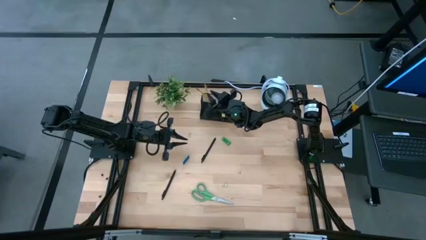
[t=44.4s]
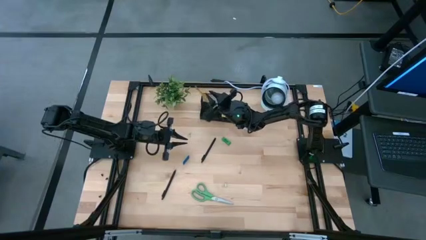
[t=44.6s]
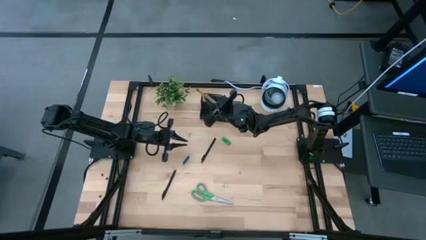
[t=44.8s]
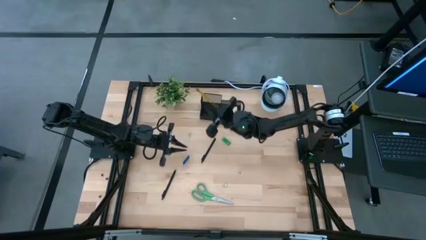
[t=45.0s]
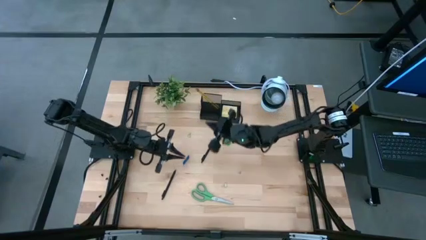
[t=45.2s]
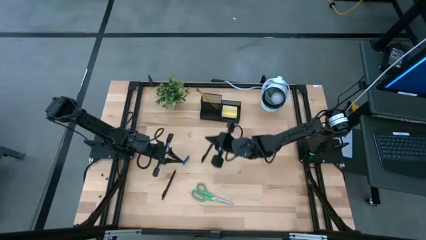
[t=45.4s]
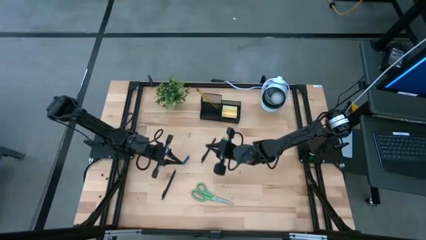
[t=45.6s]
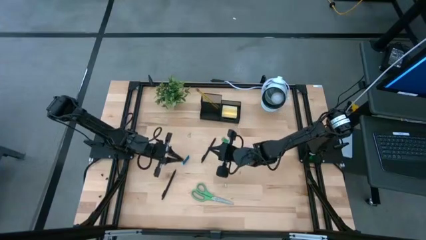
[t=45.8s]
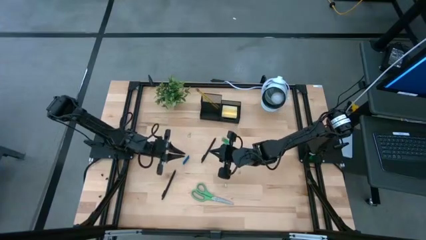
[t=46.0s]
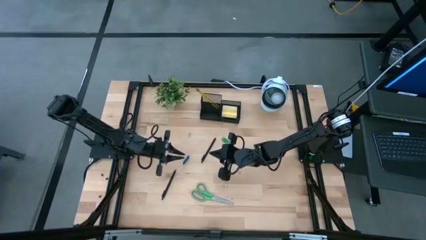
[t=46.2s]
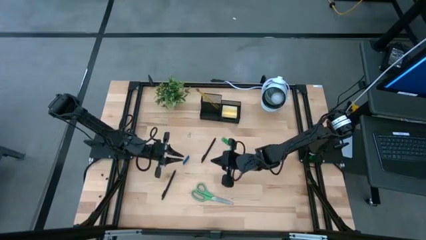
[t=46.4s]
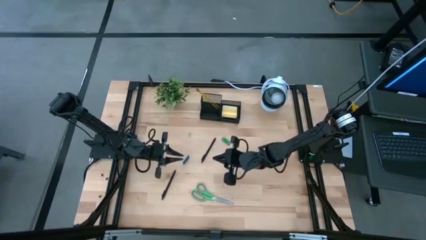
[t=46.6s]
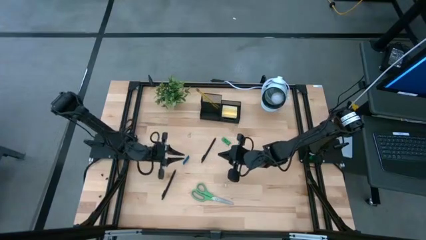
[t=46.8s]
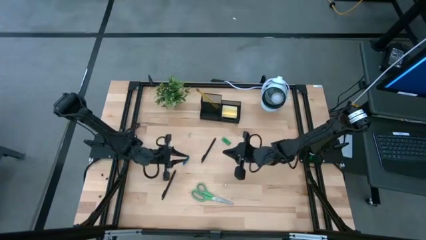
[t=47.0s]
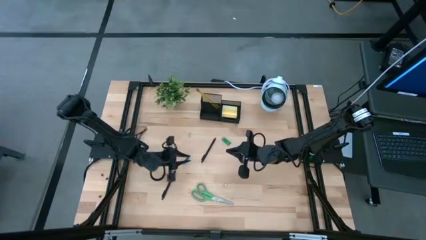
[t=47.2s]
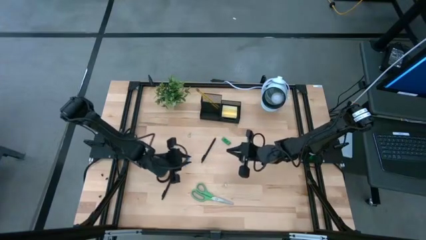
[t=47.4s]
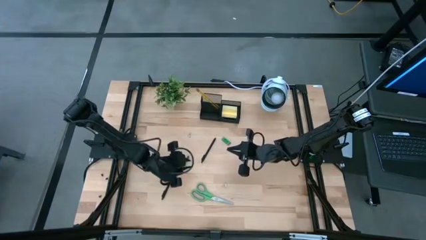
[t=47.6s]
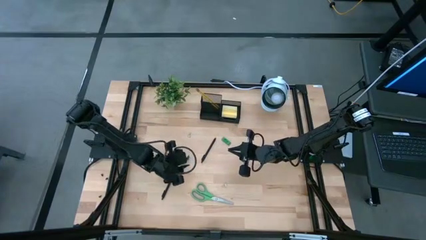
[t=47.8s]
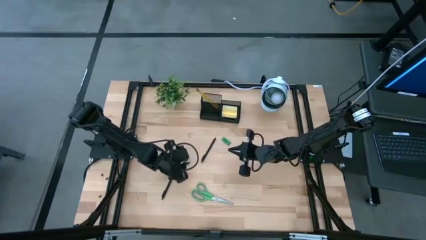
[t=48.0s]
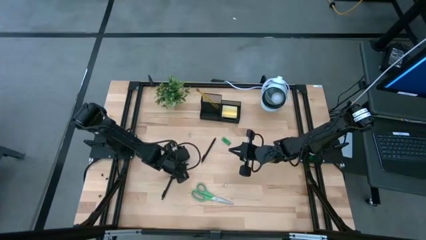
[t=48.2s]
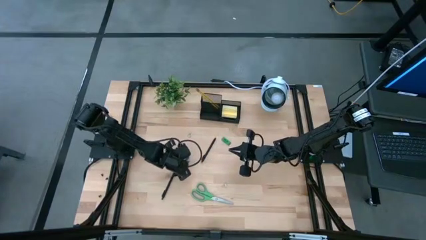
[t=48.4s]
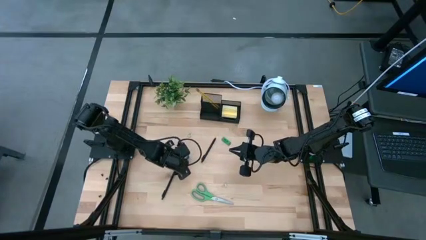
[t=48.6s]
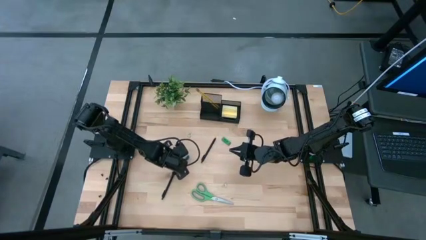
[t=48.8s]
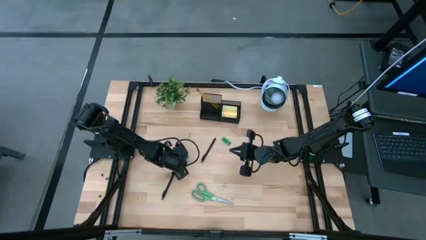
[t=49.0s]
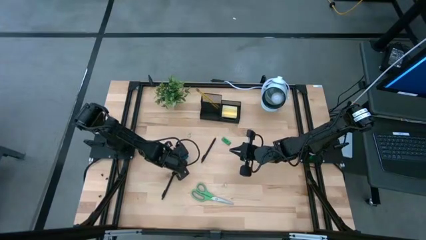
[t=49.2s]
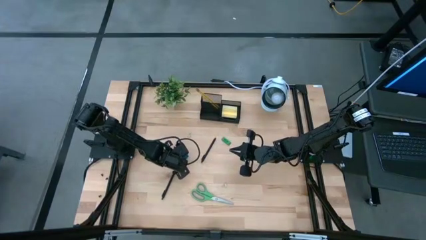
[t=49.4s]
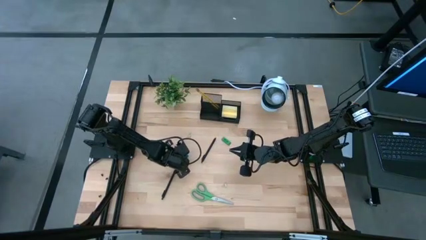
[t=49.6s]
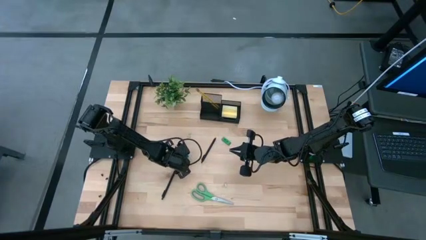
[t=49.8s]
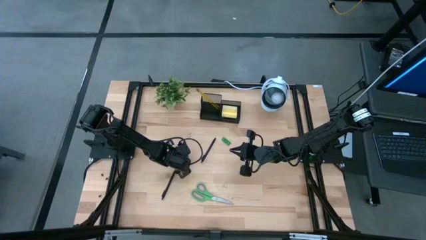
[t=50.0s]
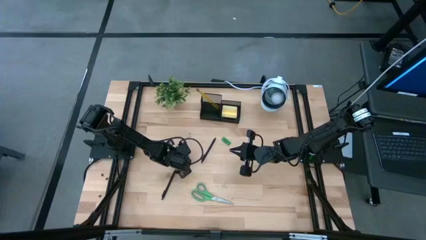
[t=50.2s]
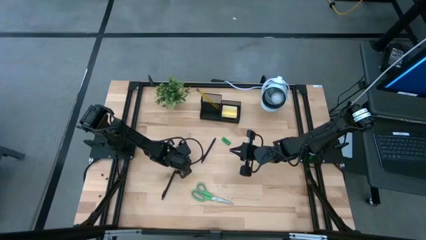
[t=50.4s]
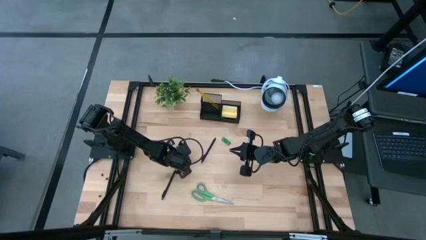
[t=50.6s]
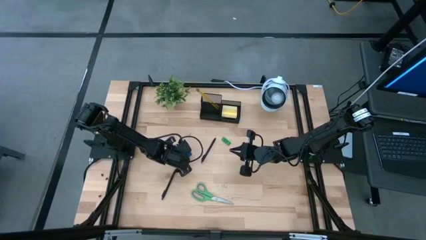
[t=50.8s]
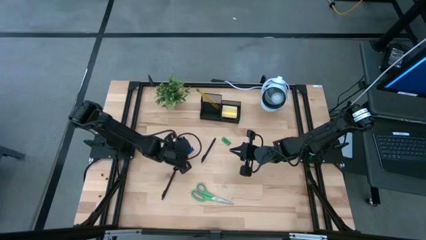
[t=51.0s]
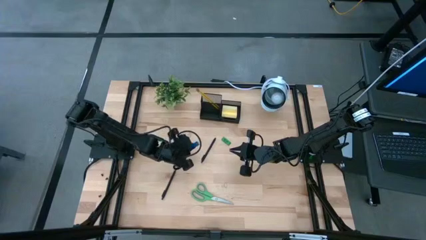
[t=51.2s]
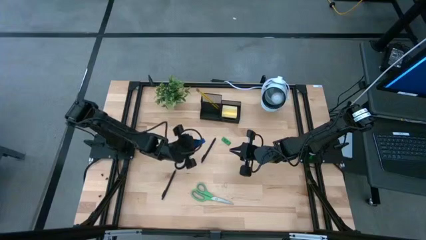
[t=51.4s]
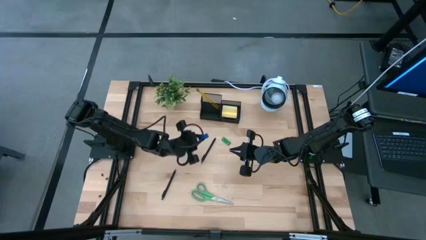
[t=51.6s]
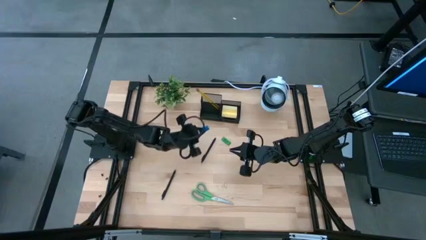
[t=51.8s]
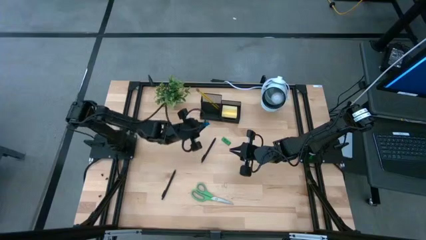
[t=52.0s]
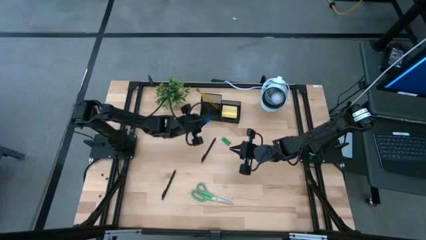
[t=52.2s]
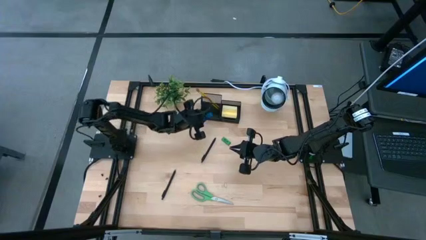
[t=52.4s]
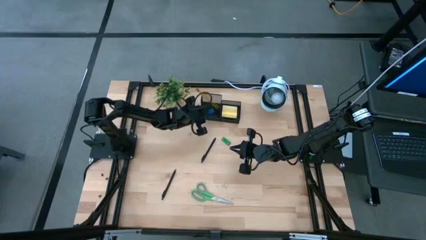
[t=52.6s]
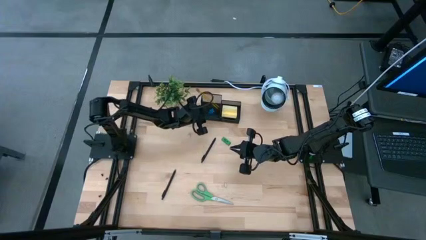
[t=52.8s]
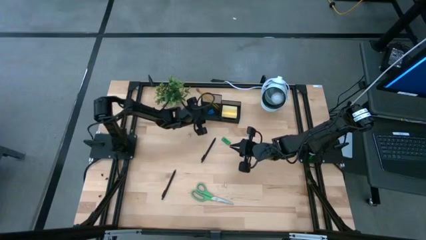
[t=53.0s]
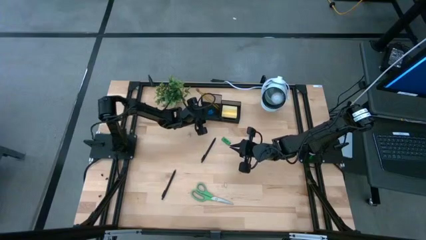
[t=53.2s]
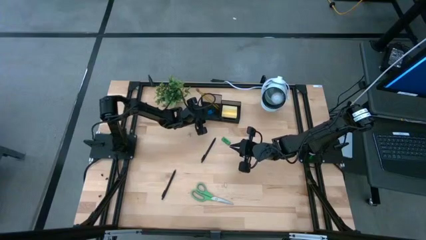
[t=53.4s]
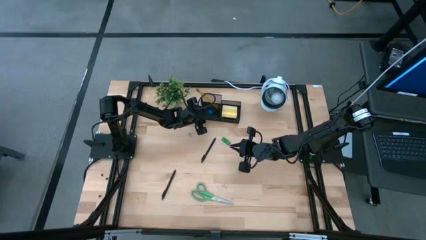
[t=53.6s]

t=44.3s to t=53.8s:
Task: Pick and place office supplies into organizer
Put the blue eraser into the black organizer

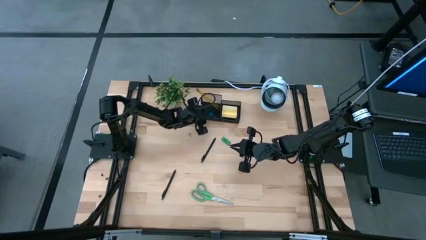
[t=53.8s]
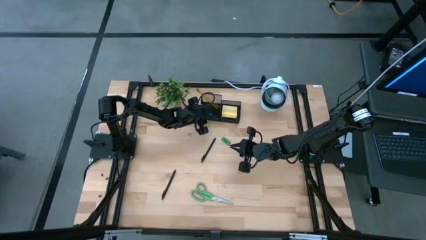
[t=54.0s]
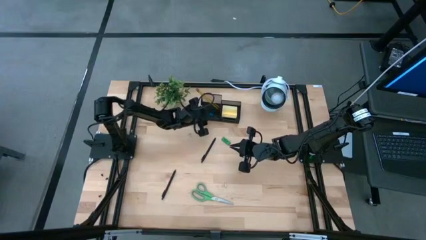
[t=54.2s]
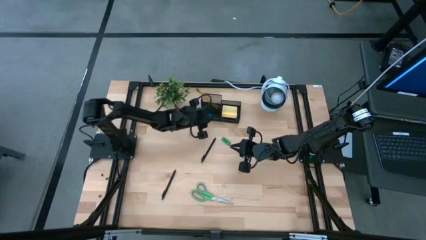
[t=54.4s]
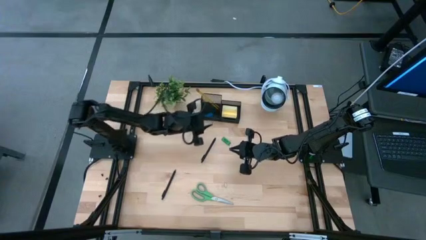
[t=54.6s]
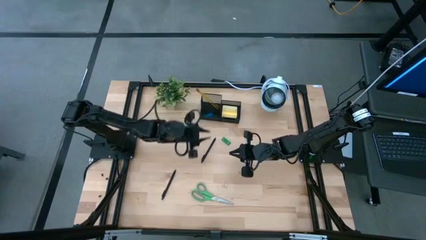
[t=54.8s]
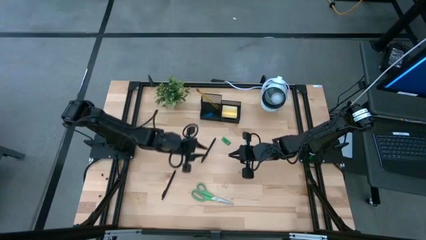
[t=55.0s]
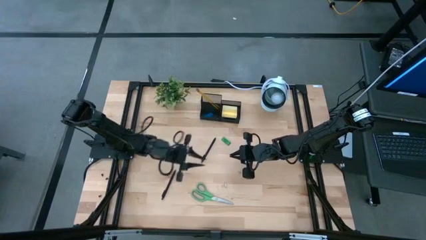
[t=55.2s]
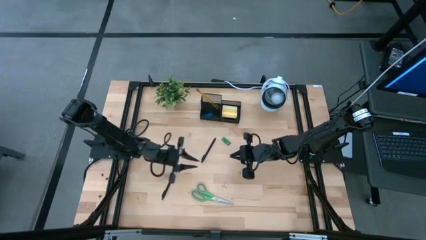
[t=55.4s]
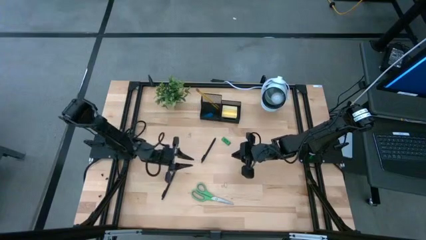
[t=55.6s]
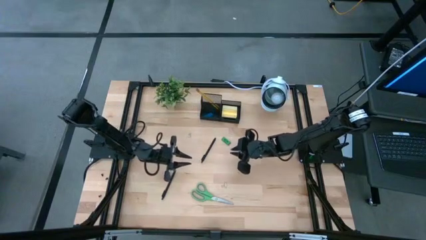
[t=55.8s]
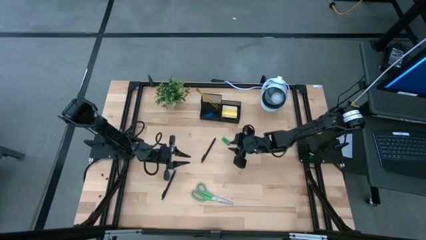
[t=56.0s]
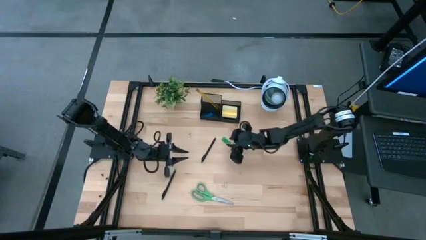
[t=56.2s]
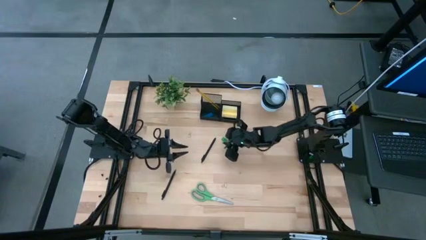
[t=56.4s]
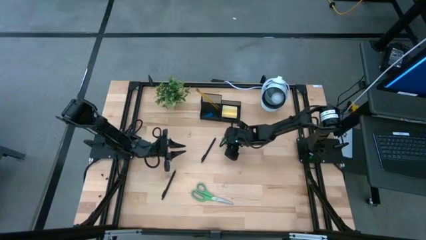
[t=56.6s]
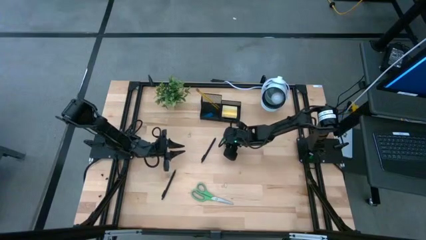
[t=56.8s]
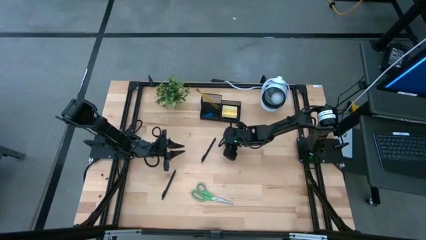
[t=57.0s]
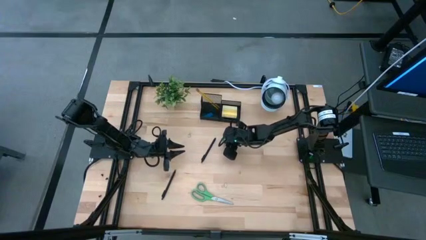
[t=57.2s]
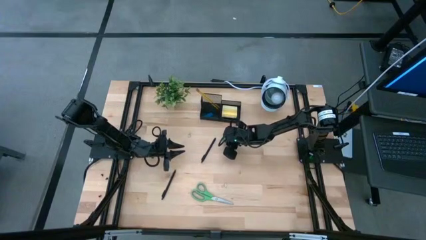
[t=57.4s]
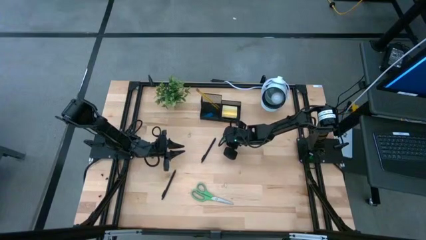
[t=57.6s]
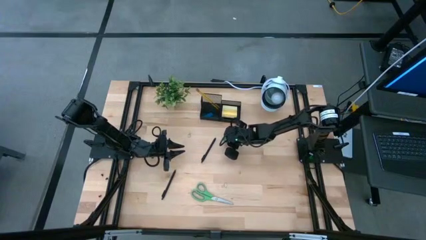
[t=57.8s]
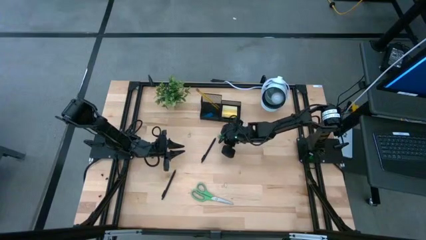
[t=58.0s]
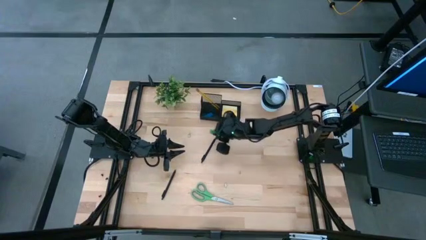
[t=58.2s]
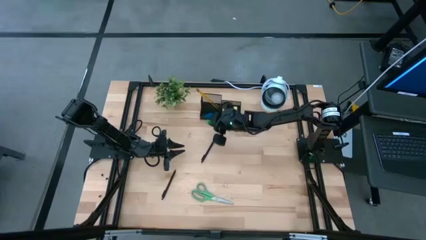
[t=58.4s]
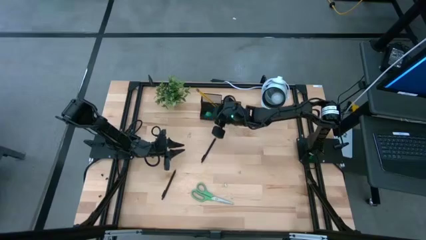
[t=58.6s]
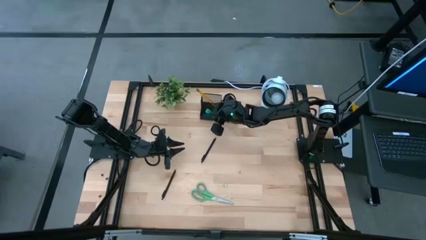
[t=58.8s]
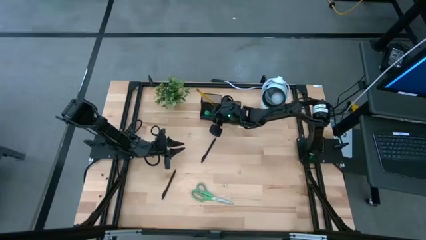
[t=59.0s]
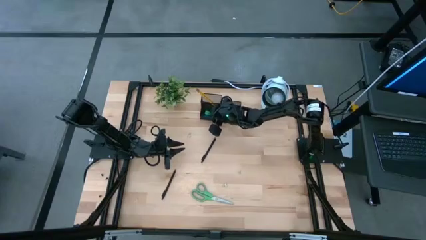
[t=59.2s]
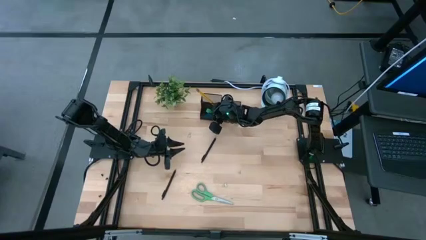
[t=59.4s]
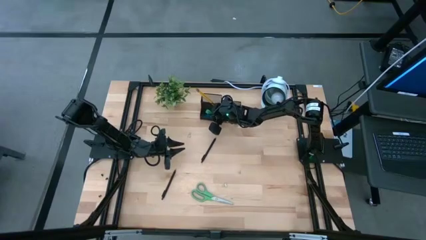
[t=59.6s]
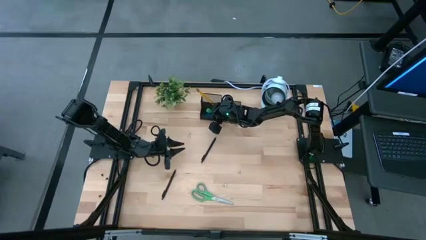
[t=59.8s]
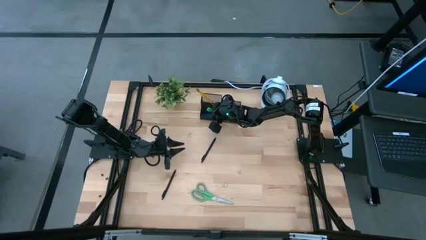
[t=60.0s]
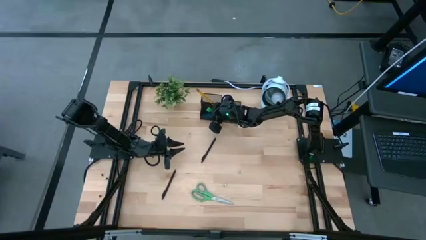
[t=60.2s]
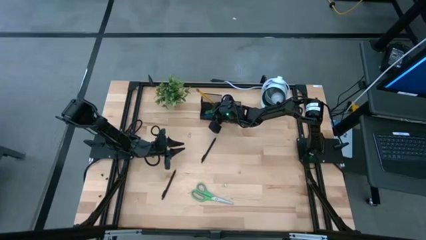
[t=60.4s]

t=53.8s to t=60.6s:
Put the green eraser into the black organizer
